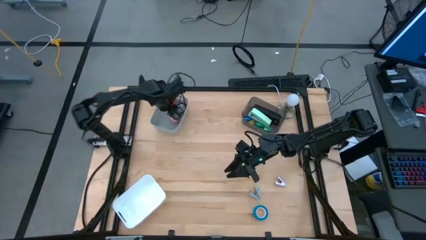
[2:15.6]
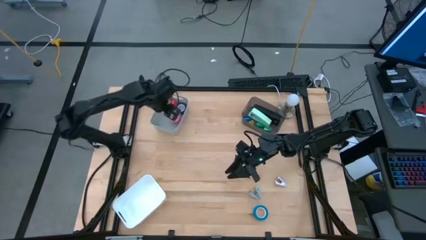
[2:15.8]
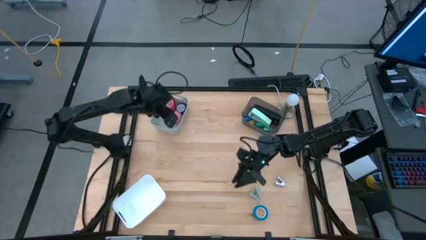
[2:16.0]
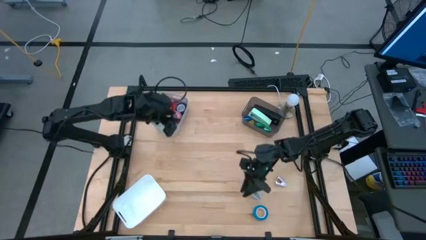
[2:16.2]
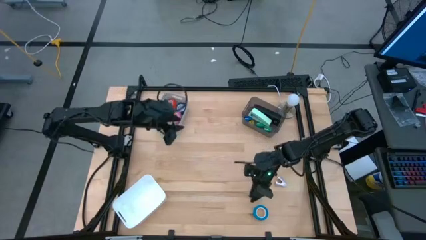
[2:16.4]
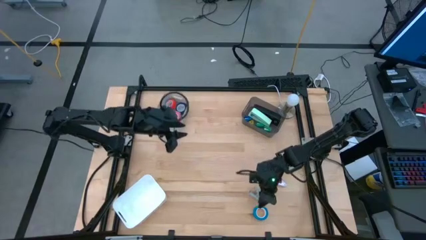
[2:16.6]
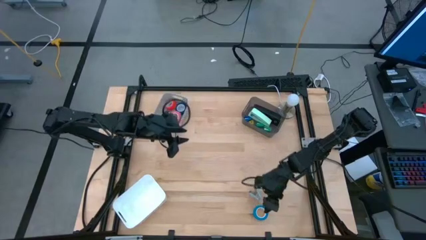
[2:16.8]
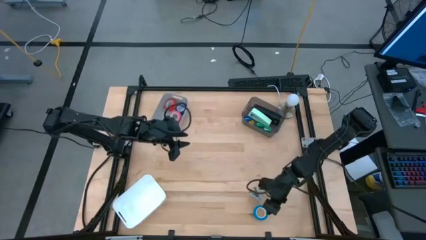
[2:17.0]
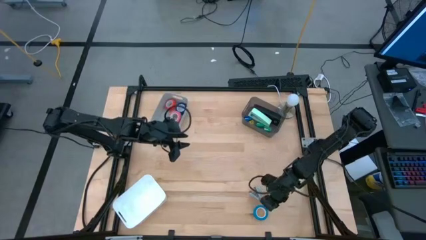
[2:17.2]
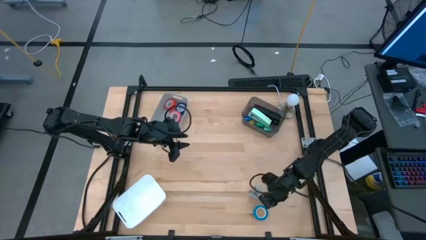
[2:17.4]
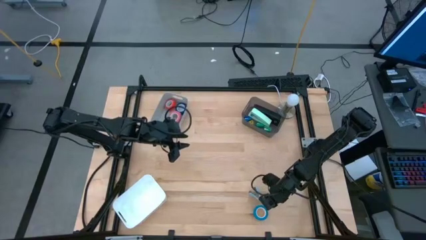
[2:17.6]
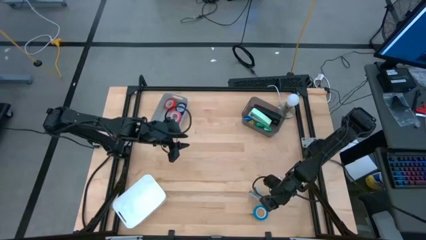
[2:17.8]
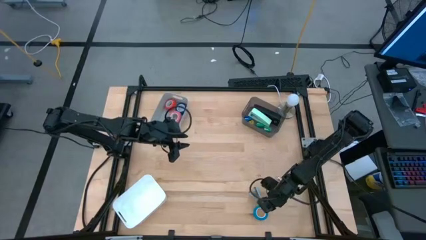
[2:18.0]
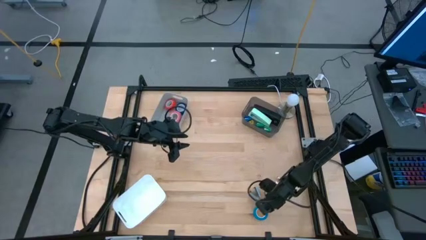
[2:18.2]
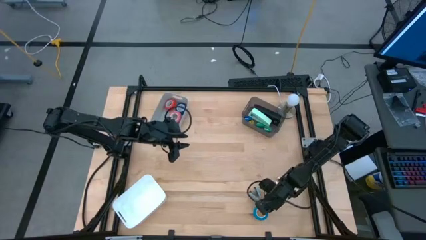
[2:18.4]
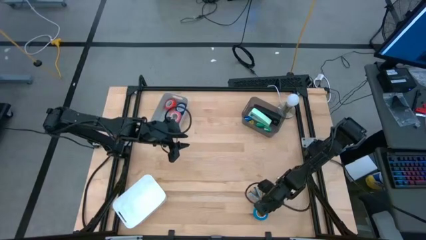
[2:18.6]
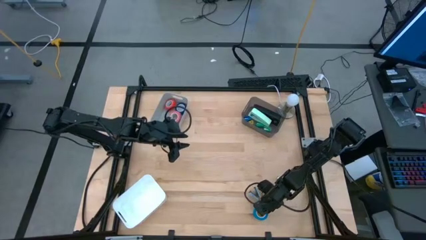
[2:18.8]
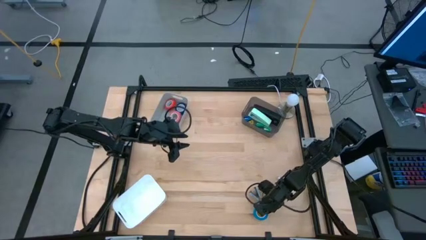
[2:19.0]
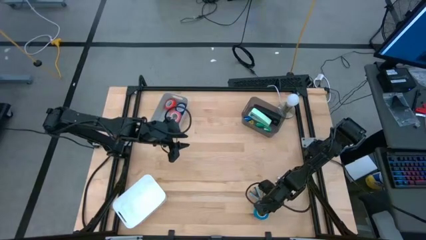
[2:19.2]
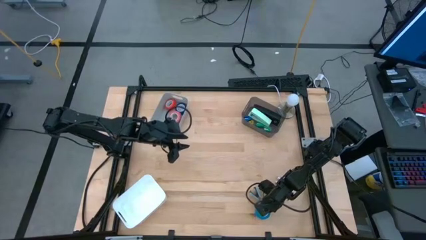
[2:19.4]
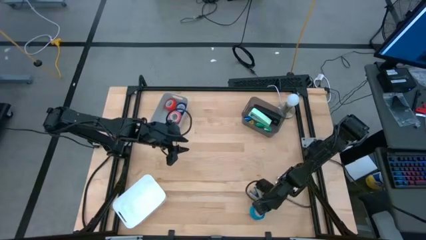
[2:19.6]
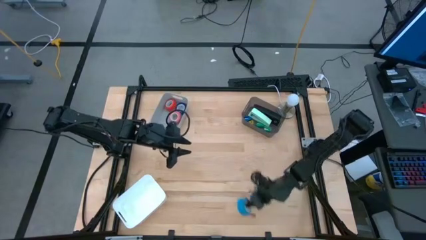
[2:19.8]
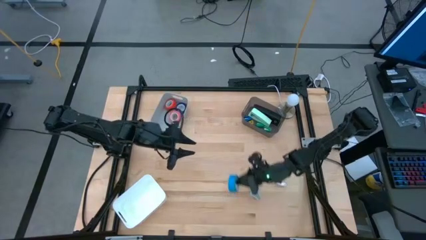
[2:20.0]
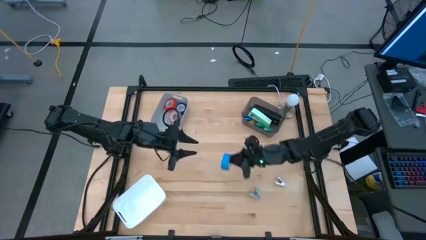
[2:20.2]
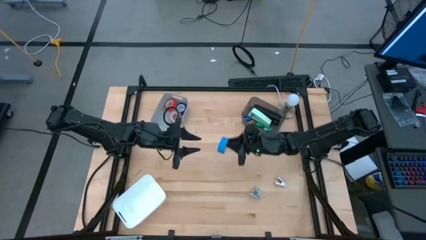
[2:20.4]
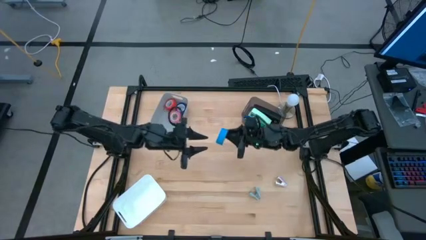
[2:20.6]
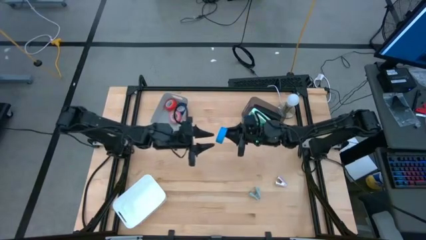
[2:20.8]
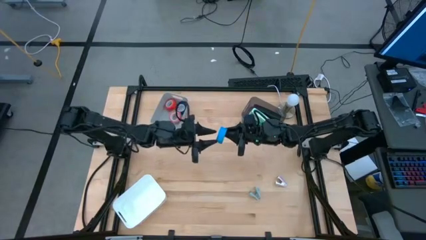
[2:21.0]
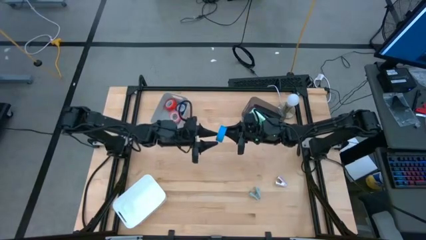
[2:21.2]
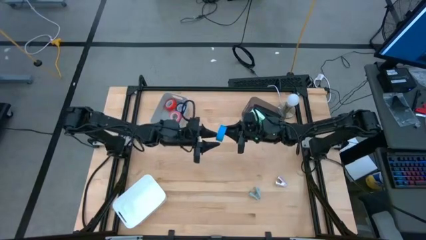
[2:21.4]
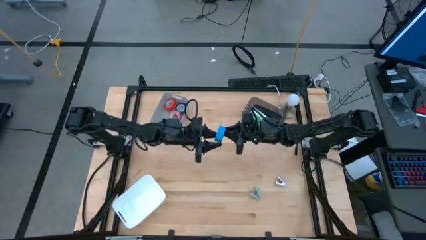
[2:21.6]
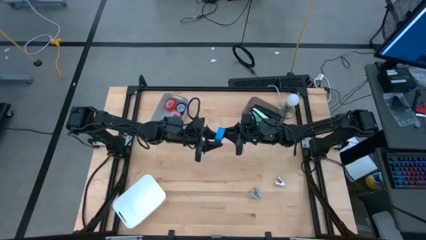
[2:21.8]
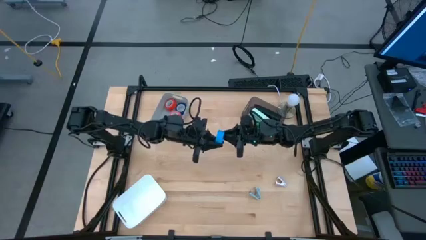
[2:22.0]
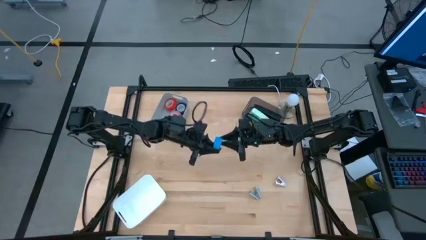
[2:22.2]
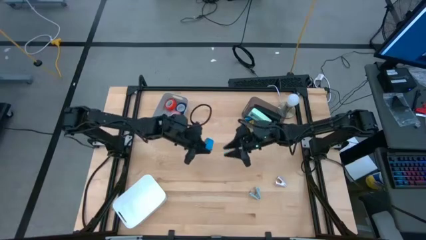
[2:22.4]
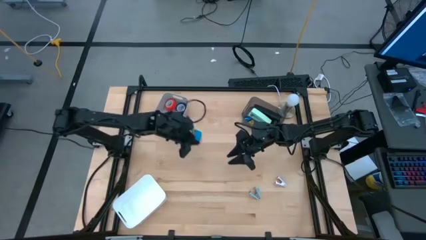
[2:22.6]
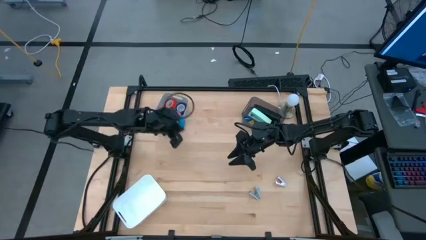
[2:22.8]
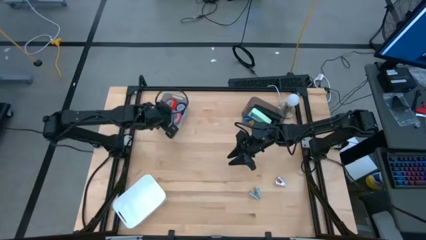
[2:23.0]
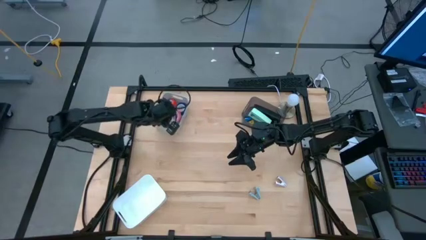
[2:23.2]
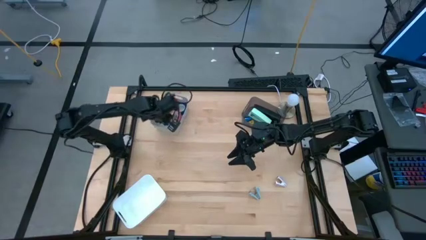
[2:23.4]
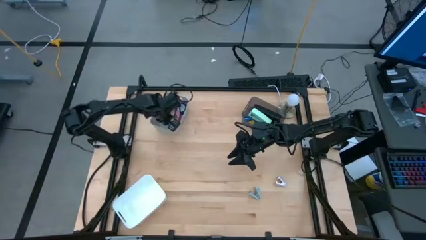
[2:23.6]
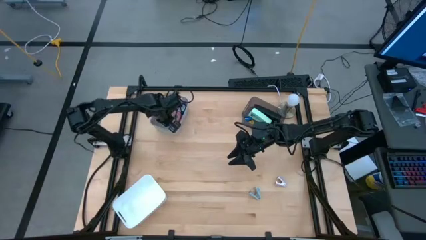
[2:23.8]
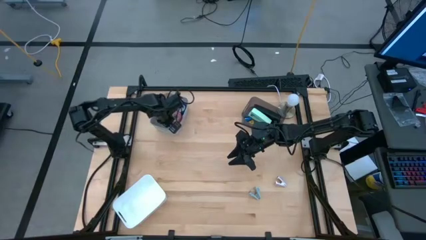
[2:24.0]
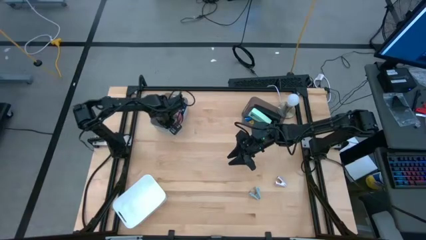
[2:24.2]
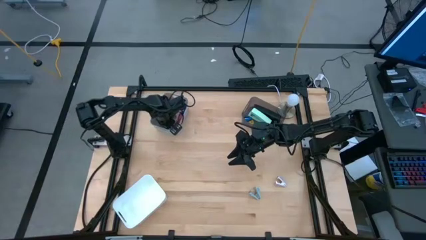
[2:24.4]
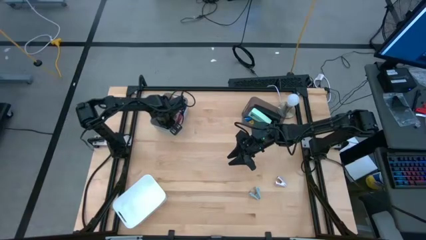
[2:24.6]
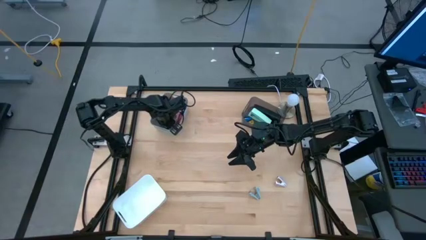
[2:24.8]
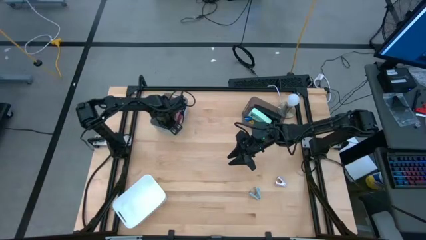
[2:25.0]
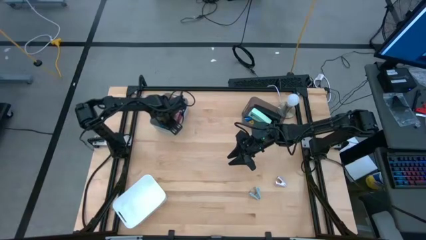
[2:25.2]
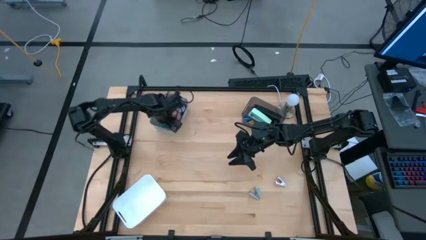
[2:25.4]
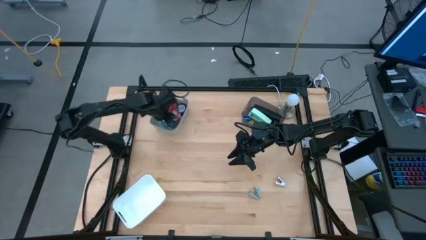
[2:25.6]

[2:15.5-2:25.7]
Task: Pick and place Stapler, Stapler remover, tape
Put the light blue tape into the gray bin

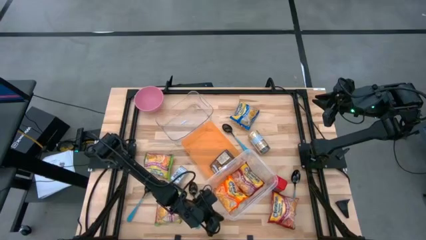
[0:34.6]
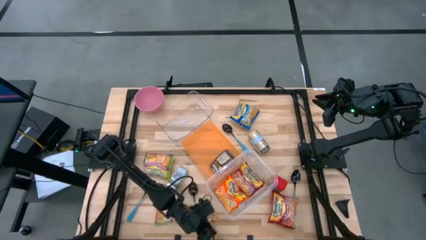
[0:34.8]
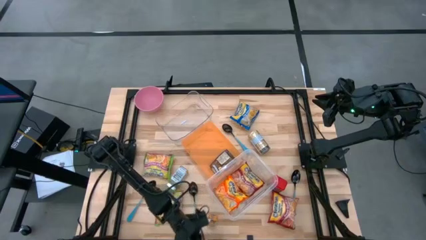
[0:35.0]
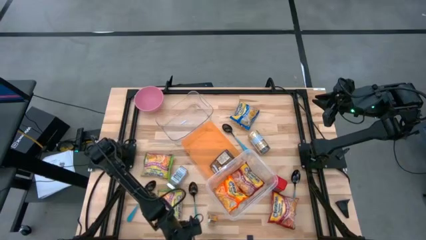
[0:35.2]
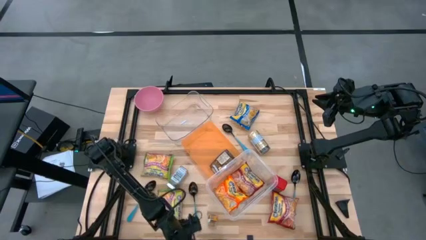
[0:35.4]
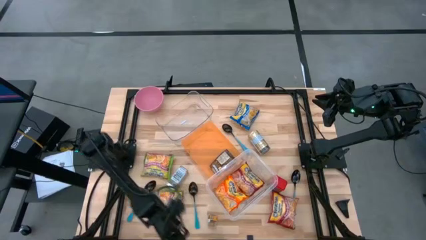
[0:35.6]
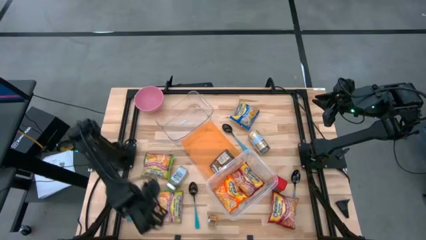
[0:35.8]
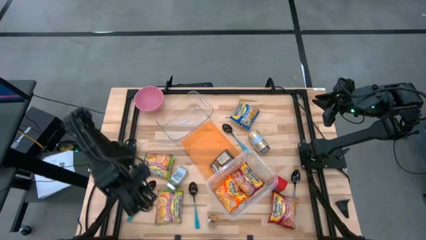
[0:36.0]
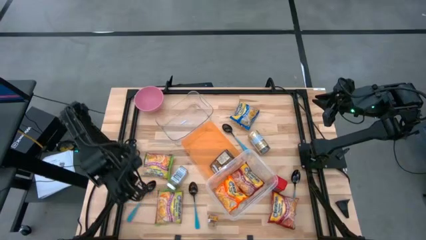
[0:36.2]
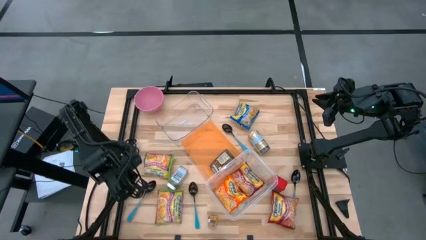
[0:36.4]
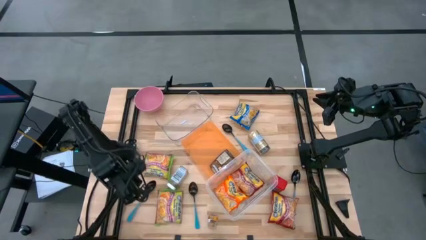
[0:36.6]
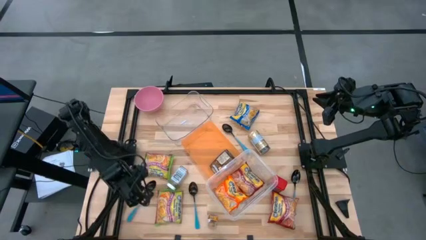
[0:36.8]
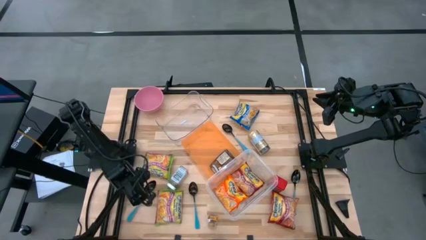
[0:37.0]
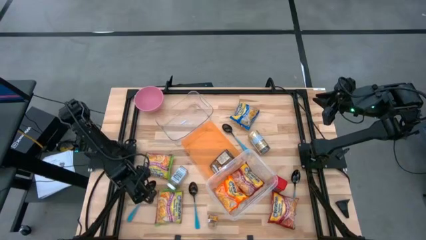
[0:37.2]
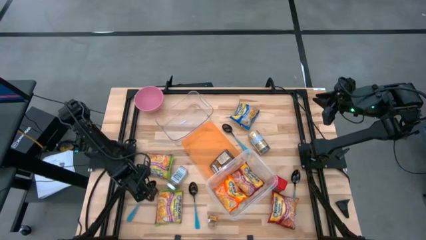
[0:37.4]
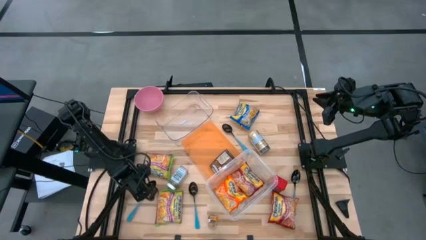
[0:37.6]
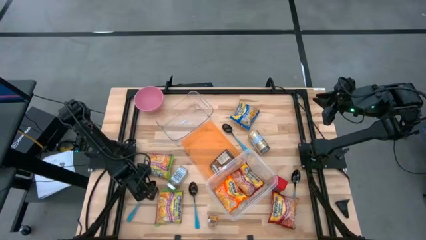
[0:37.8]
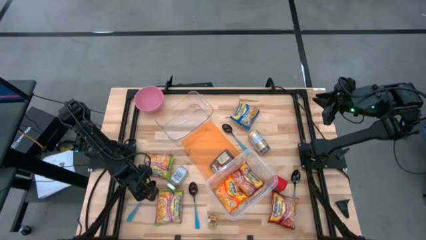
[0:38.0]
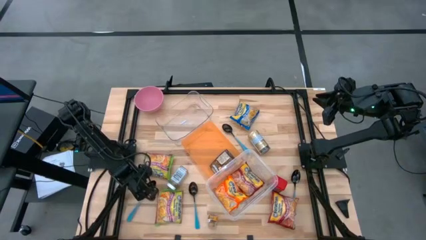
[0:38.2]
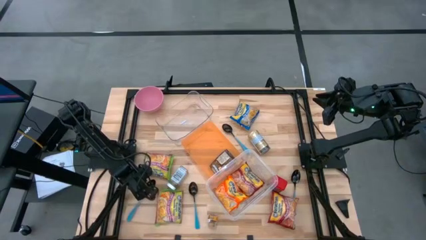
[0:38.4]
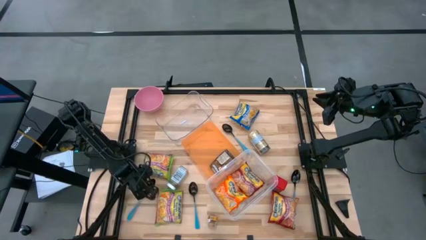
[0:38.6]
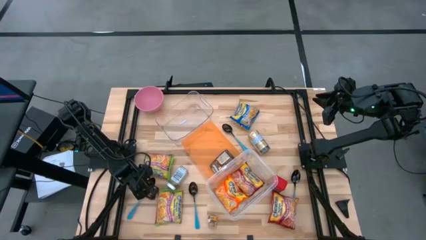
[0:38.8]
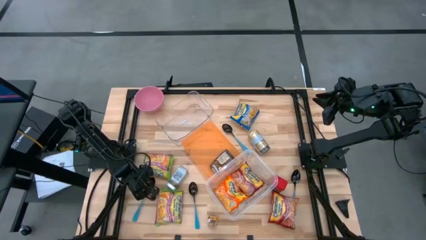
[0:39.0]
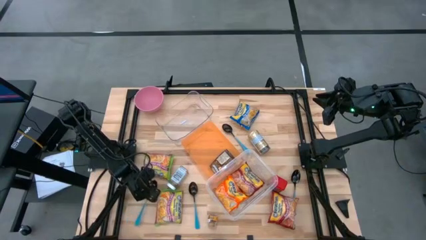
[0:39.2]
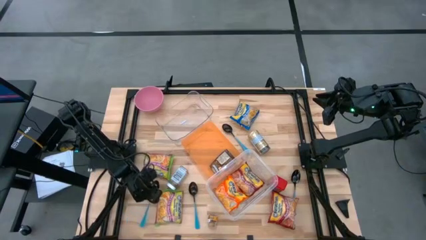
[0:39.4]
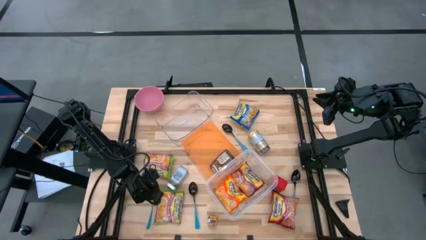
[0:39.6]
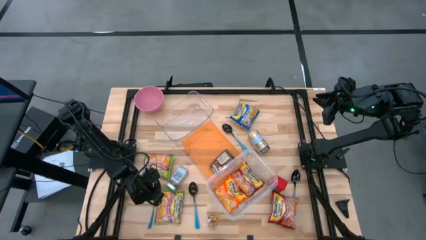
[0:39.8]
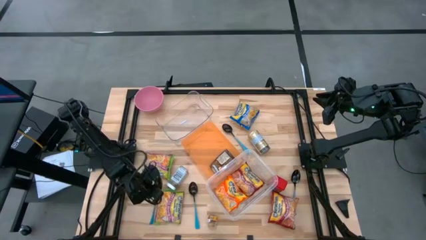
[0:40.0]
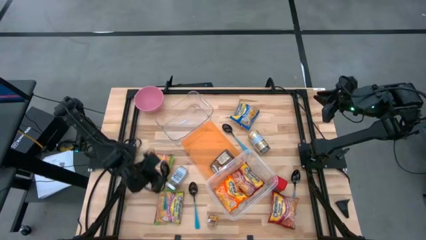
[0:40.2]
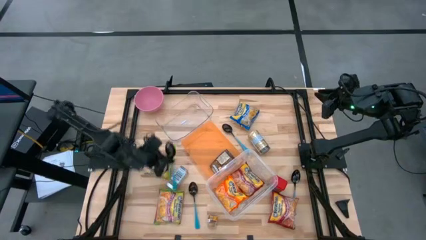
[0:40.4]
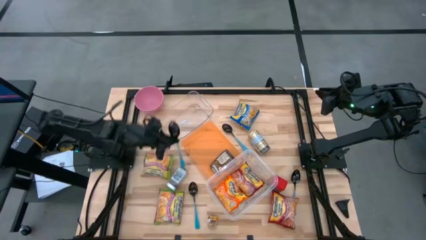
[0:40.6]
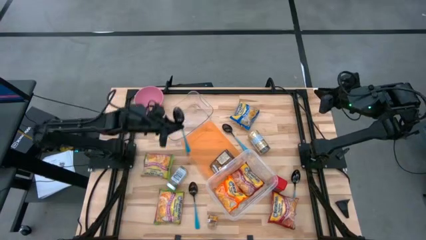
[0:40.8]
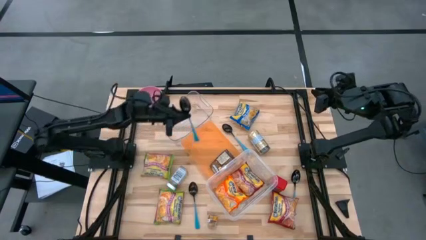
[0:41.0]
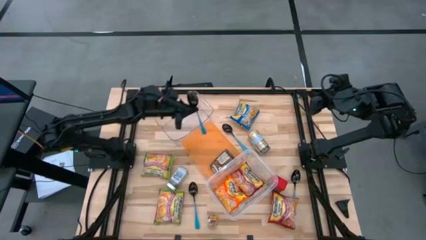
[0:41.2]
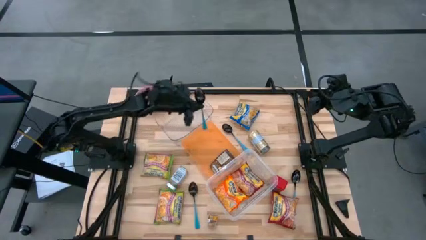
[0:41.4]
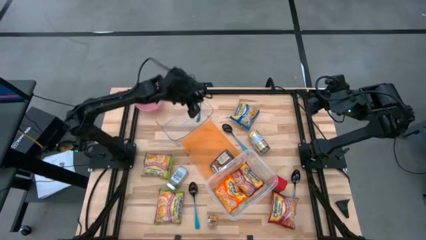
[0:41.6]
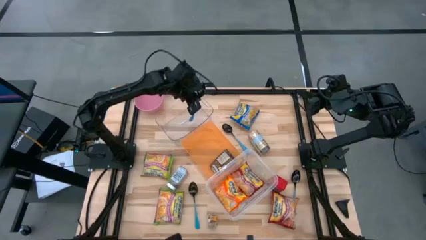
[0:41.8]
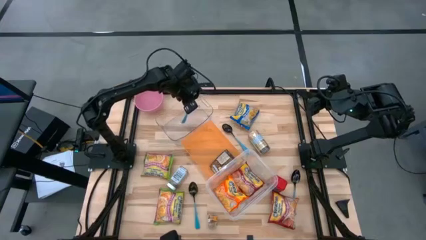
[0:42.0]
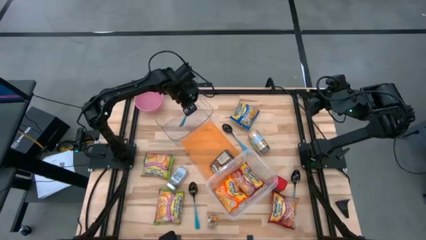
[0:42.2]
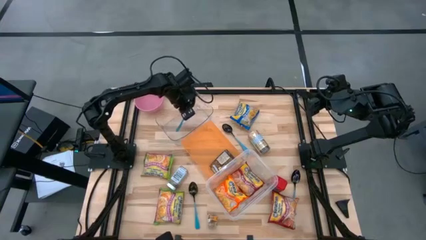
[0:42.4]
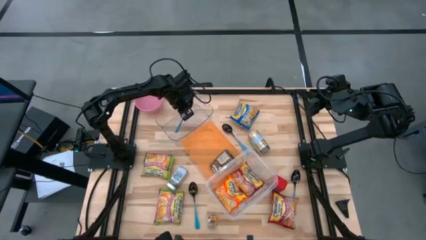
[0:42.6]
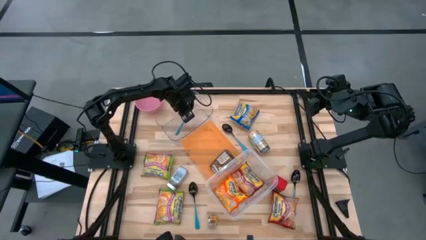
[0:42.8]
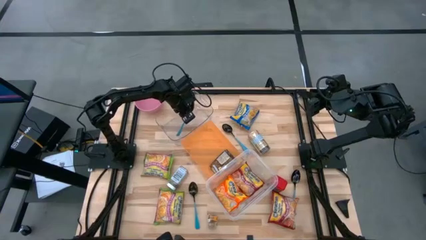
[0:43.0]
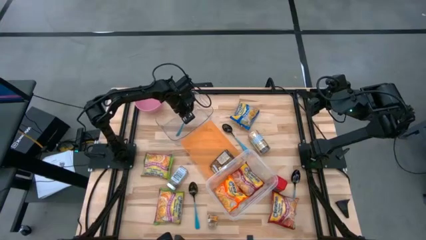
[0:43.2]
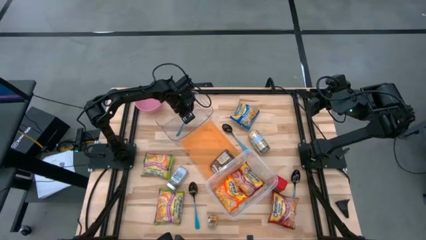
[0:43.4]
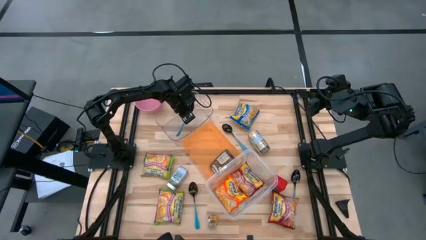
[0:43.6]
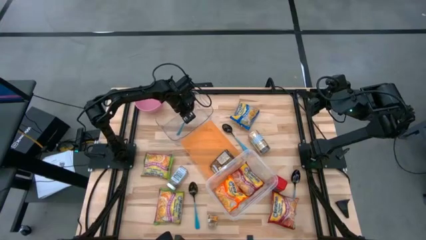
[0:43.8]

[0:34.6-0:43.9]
Task: Pick & Place Food Item
Put the blue spoon into the top transparent bin
